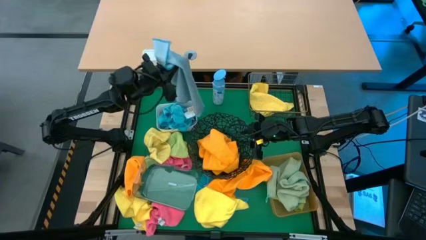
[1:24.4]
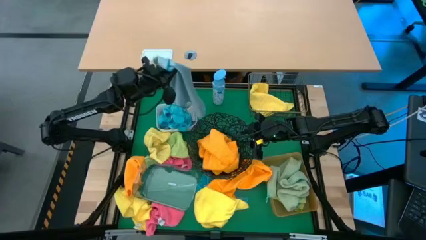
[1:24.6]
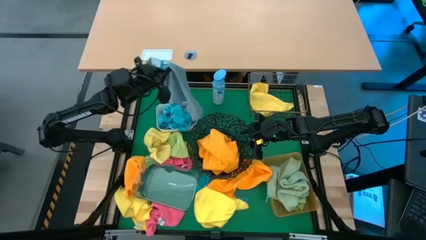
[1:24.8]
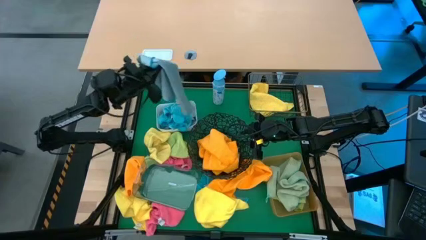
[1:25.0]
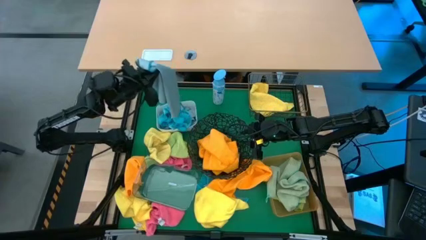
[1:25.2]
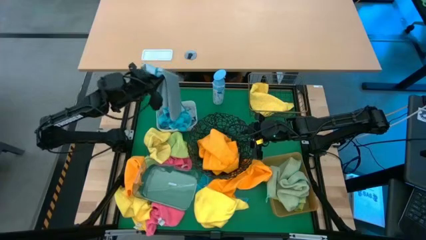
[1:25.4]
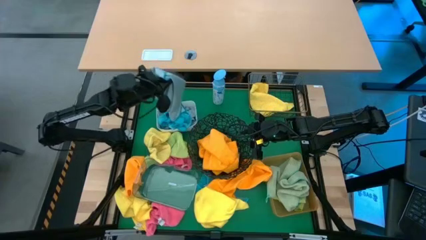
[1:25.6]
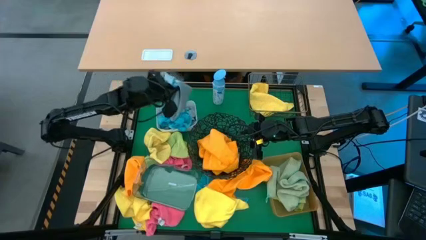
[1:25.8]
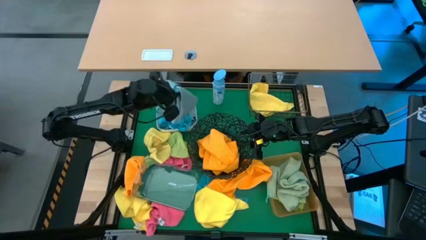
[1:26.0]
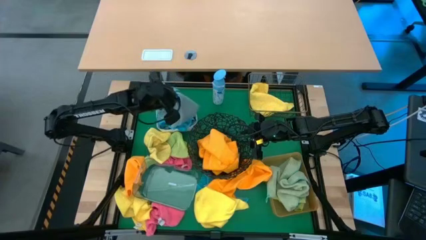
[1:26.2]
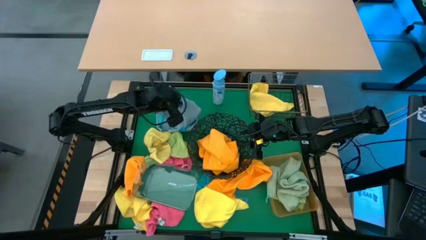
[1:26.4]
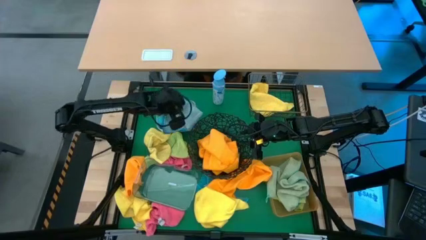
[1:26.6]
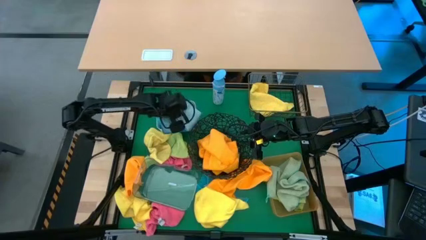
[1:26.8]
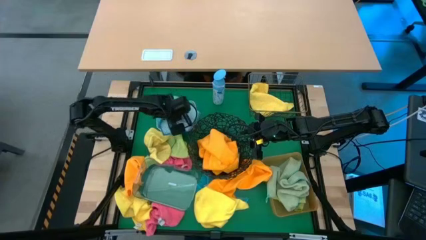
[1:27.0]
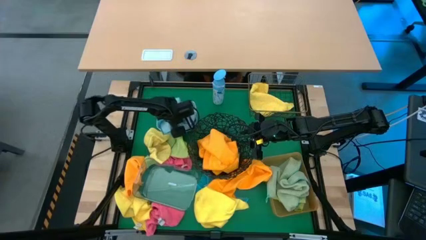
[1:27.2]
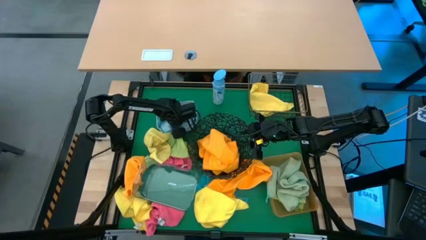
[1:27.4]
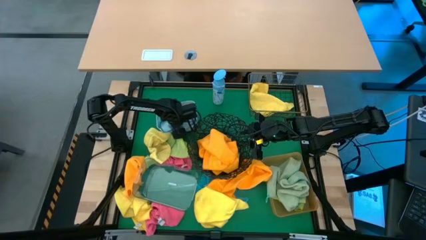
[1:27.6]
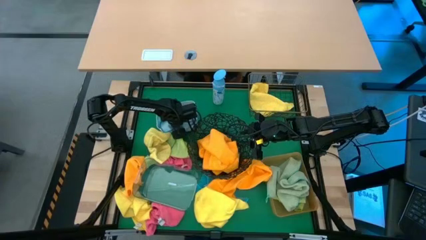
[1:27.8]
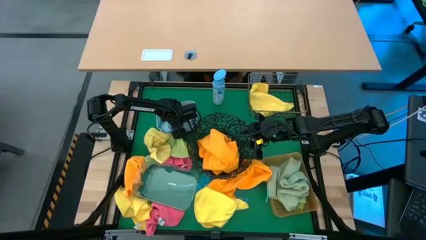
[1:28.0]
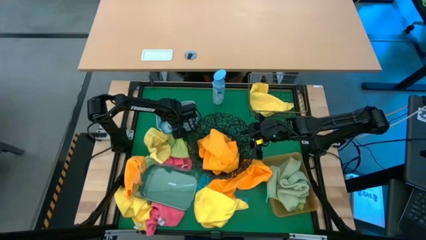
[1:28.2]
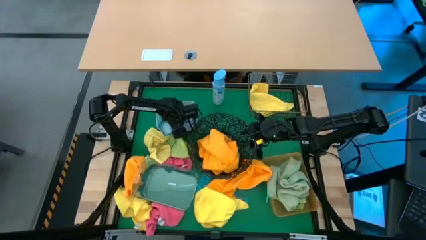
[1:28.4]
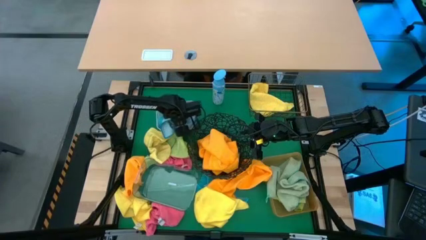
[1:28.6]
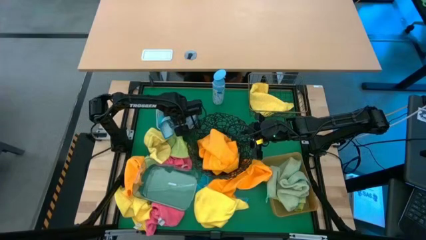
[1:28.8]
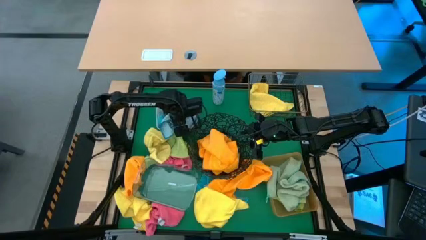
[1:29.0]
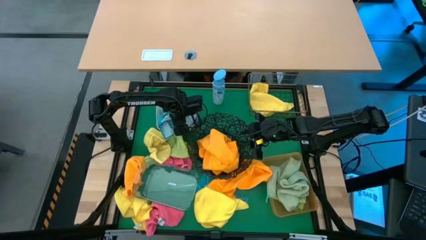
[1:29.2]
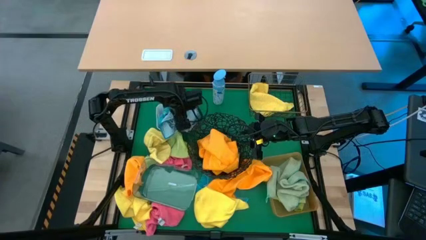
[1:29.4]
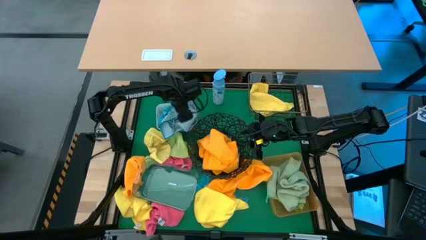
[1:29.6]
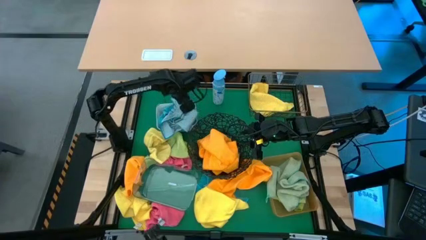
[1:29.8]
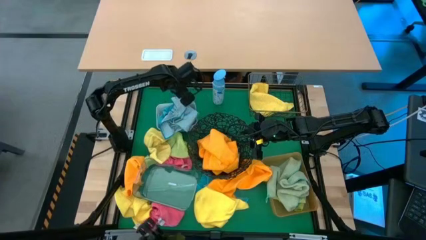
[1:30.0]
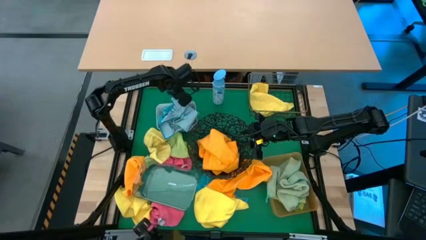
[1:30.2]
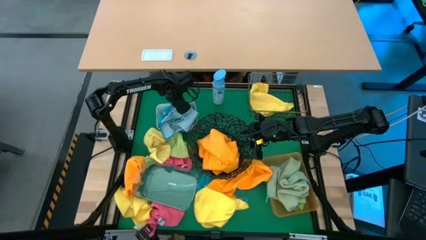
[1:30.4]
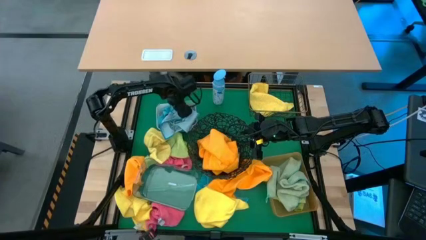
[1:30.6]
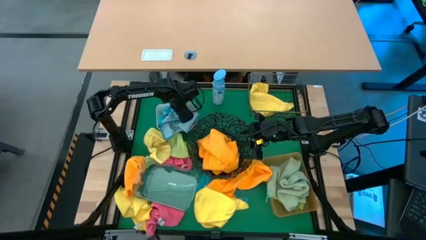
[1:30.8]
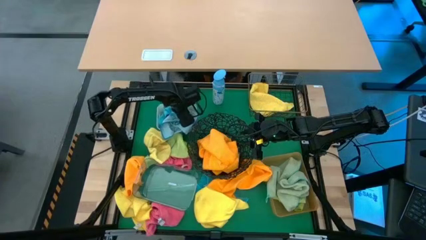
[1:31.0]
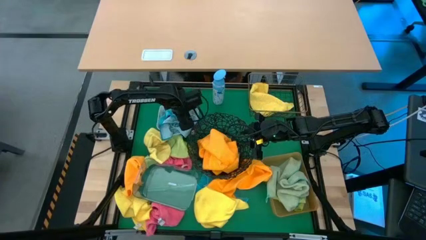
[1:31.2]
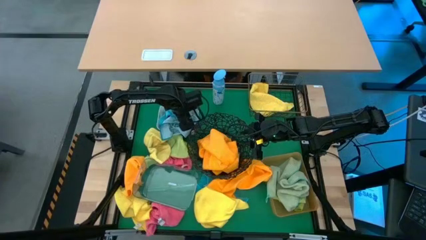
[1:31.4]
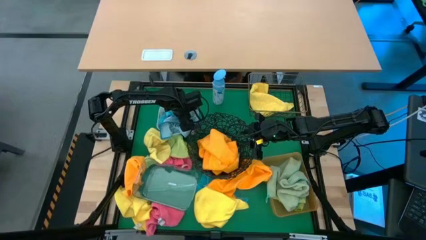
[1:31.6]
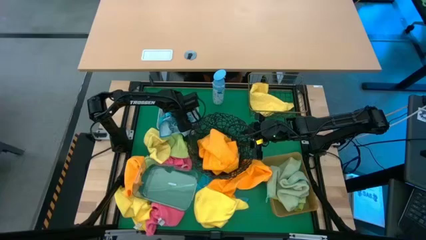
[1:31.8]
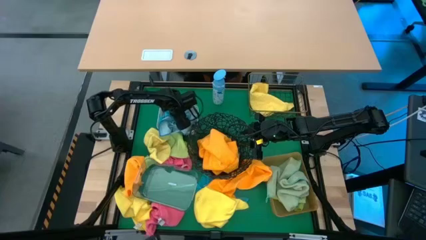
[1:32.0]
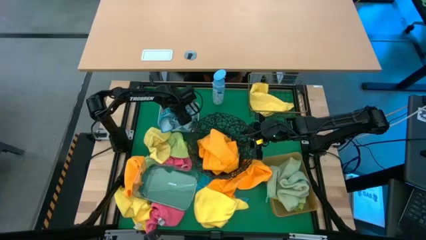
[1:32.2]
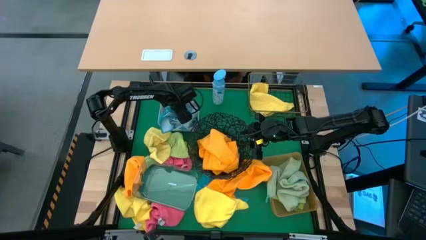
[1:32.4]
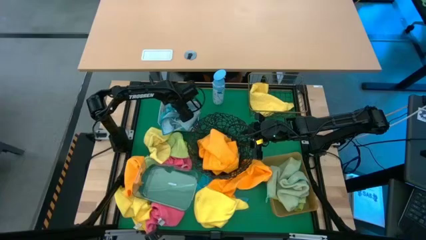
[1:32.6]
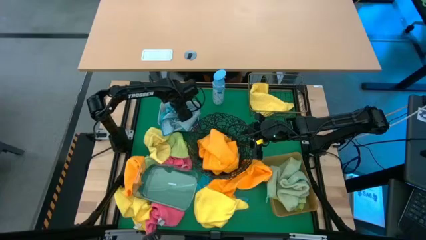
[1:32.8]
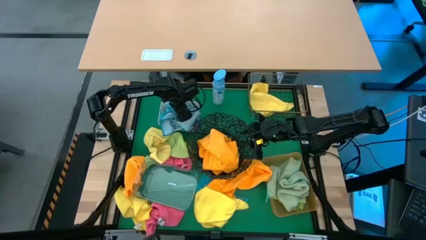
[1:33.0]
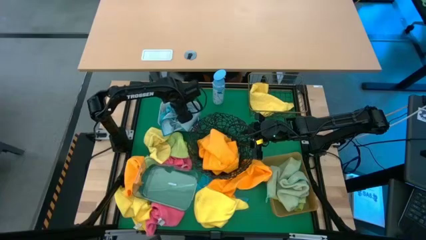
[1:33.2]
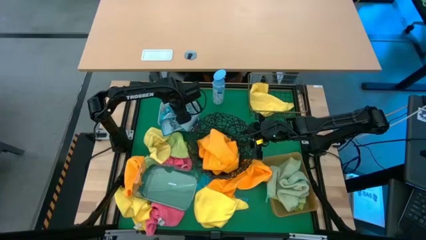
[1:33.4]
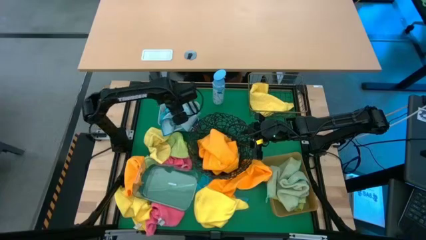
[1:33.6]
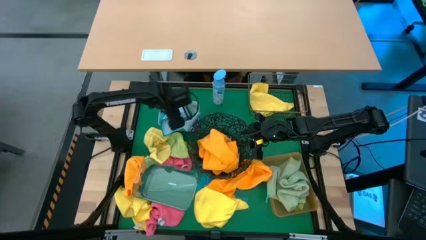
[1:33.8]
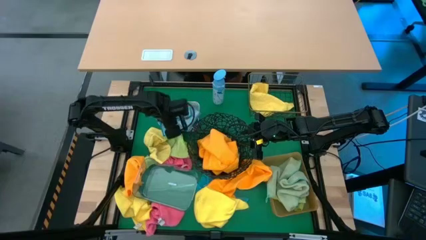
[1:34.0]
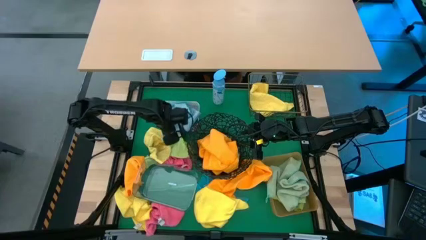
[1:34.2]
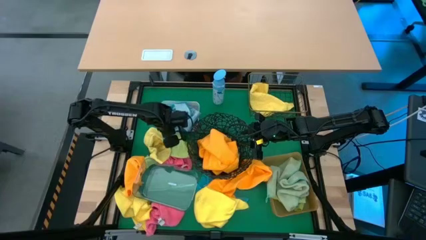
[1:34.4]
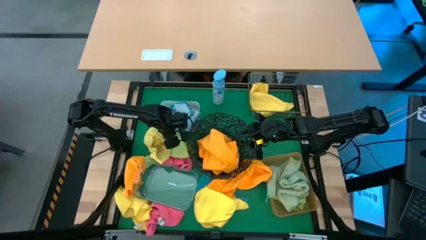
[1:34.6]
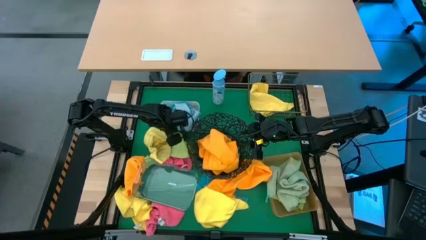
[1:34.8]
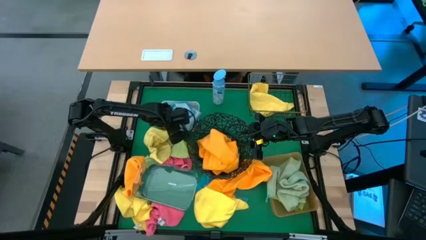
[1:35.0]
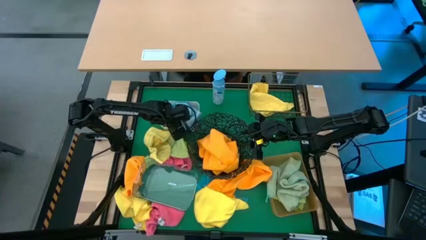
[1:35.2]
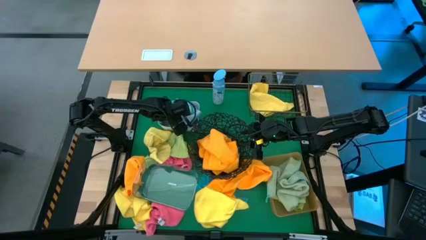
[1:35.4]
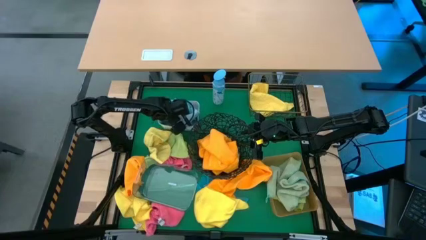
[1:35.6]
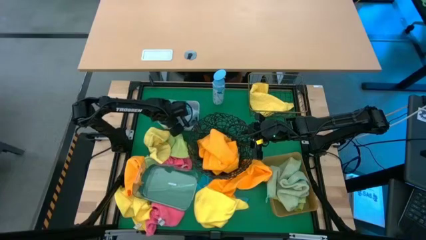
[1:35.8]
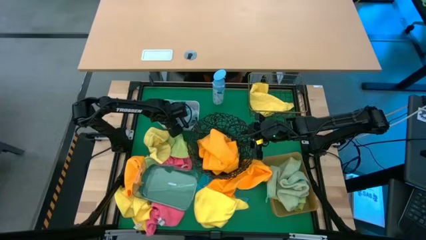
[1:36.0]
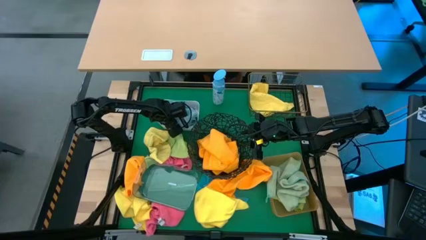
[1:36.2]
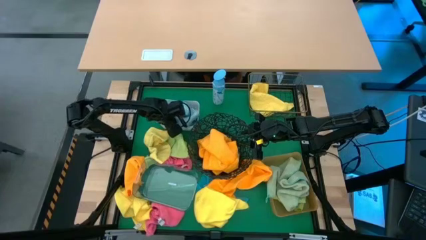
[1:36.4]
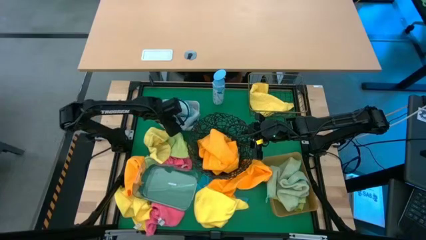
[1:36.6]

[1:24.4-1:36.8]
Task: Sort microfiber towel by color & place in baskets
Put the light blue microfiber towel into the white bin

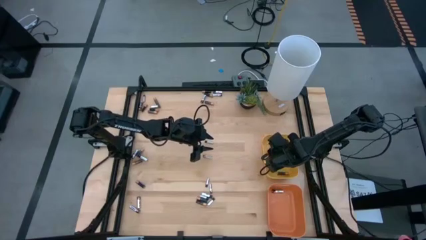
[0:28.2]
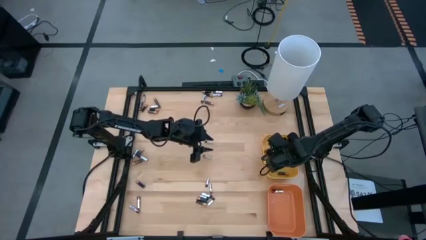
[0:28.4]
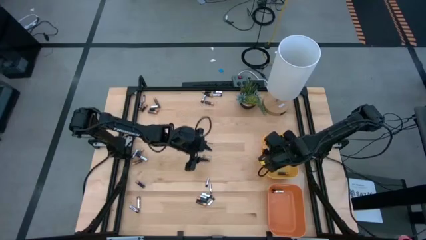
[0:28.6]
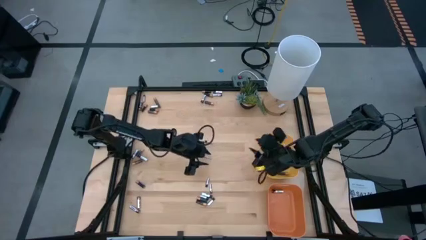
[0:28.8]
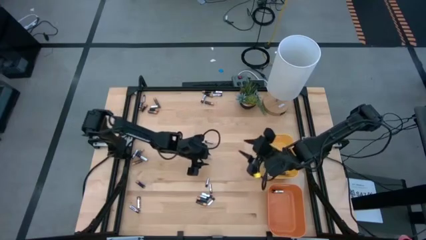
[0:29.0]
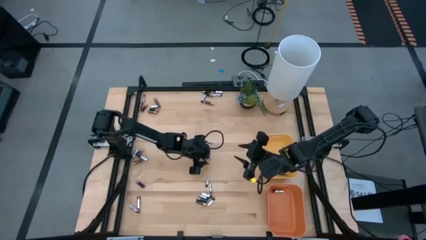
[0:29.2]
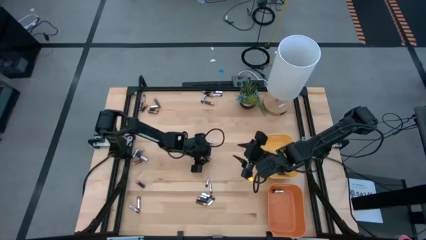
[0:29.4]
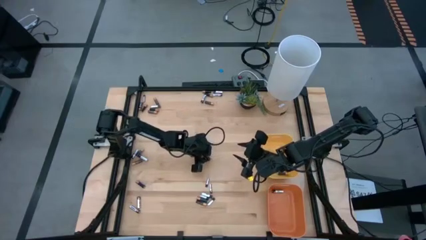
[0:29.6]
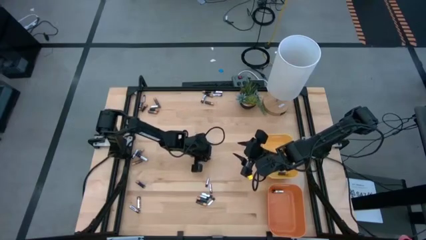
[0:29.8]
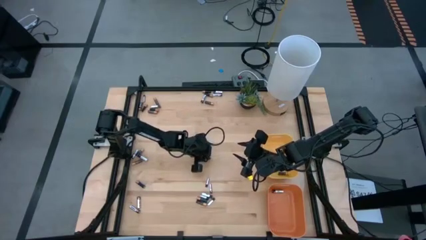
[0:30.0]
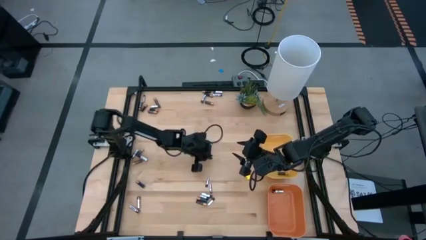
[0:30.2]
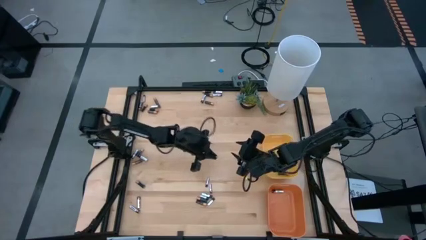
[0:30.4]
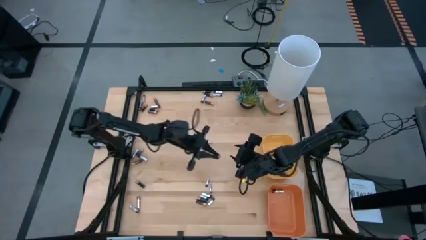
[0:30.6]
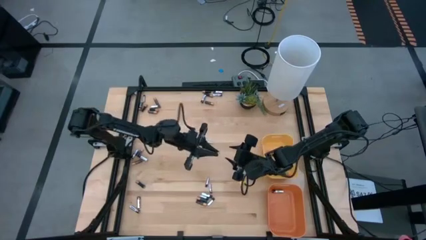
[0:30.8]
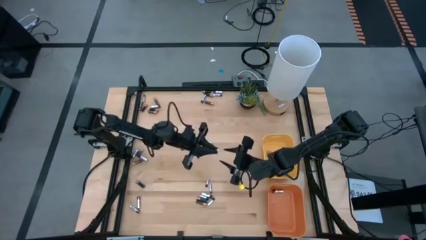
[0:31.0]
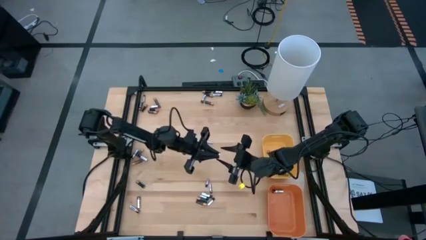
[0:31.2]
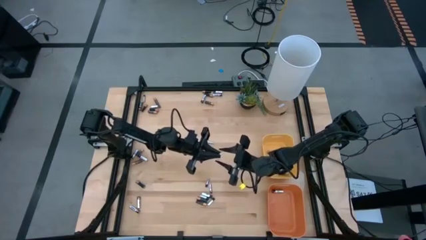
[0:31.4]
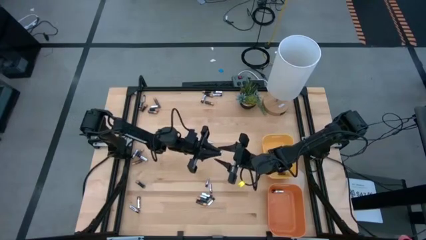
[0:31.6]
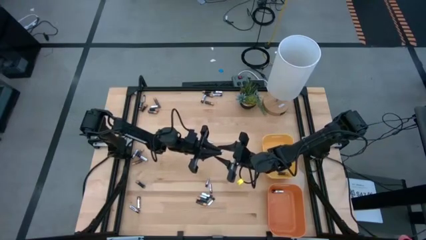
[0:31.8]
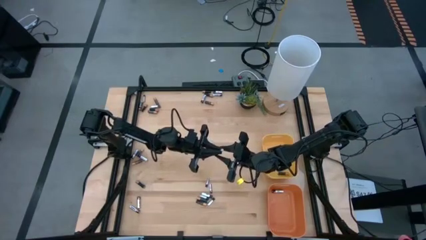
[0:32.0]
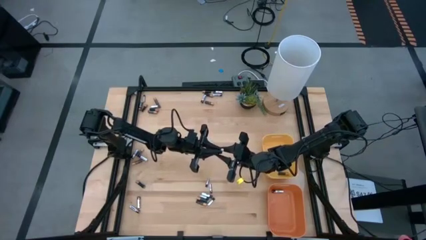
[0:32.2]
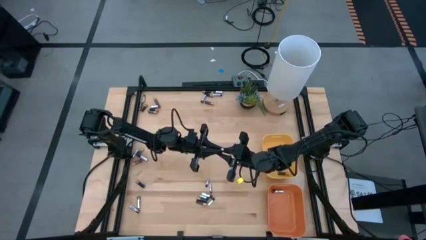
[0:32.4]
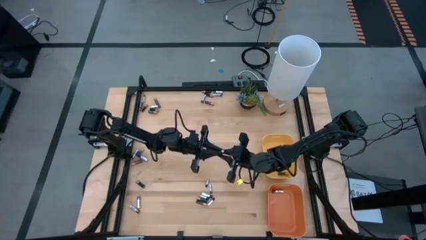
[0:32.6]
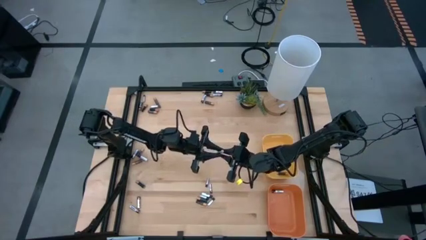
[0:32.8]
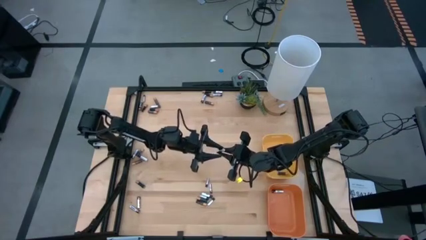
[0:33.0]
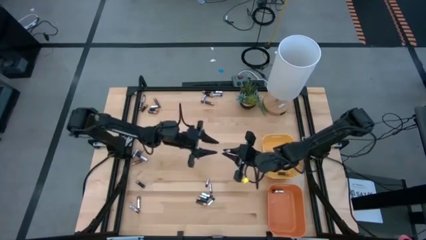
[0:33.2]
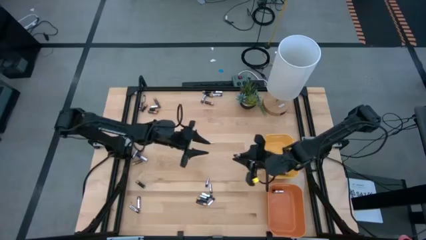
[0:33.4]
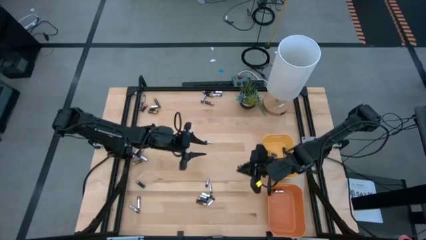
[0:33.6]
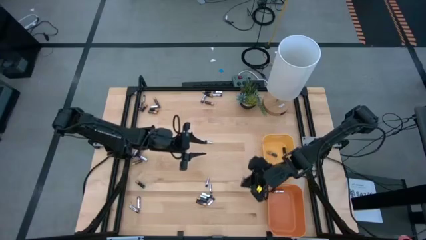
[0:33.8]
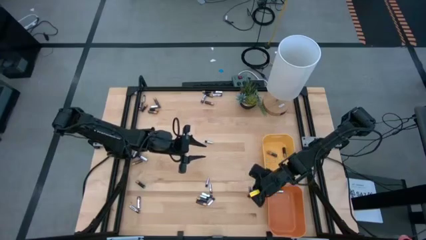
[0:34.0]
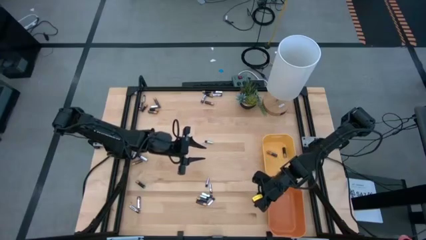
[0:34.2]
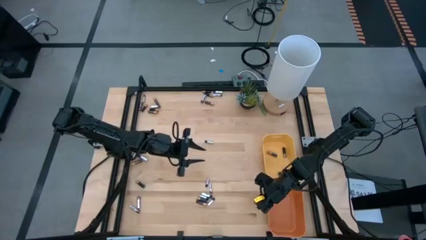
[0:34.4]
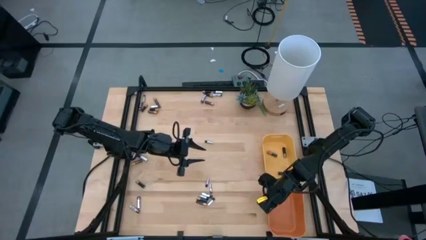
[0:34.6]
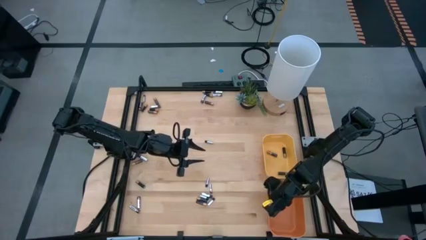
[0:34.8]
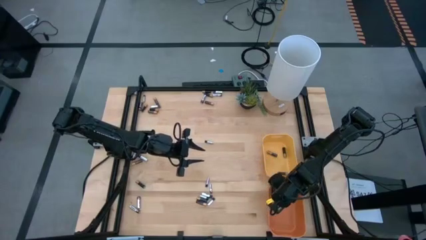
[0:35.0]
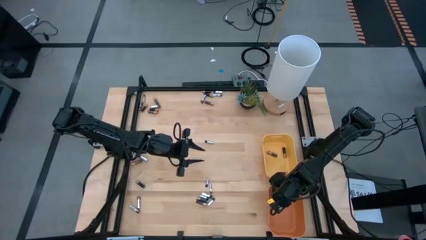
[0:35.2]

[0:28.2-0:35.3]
Task: Sort batteries
Put the black battery into the orange bin
